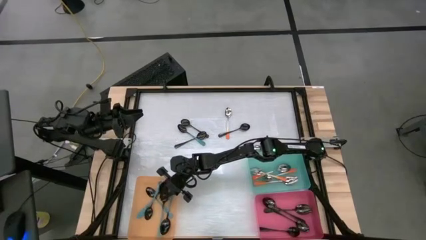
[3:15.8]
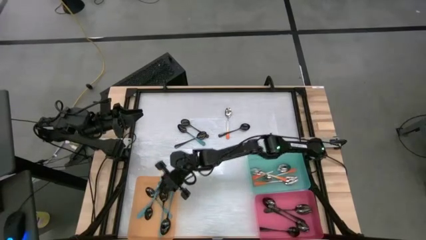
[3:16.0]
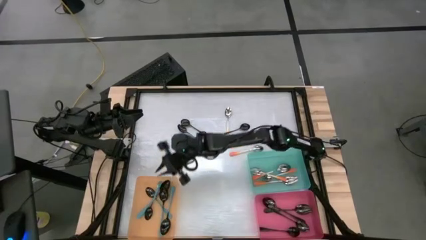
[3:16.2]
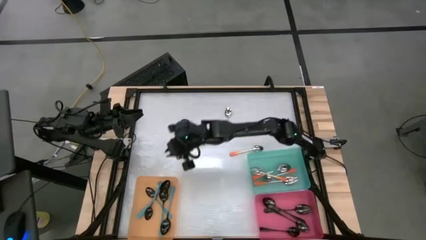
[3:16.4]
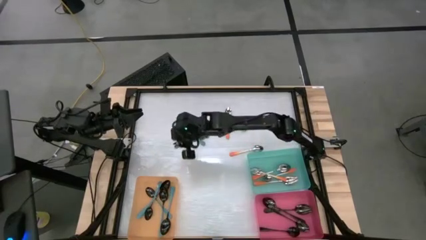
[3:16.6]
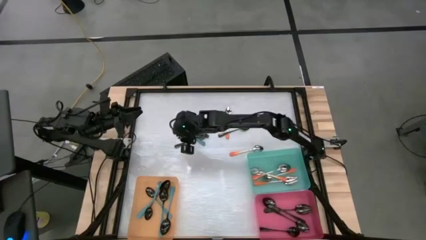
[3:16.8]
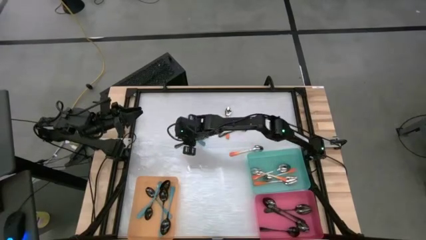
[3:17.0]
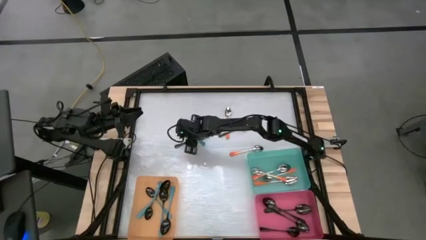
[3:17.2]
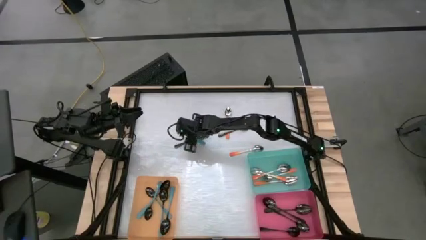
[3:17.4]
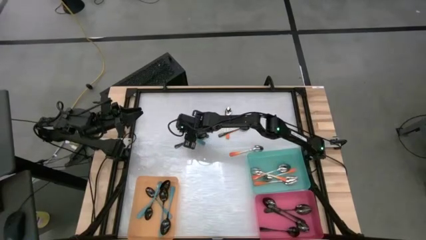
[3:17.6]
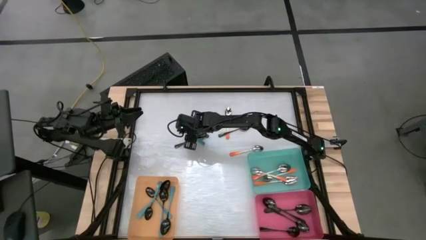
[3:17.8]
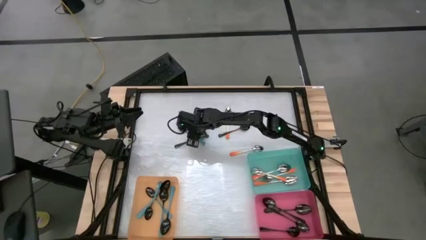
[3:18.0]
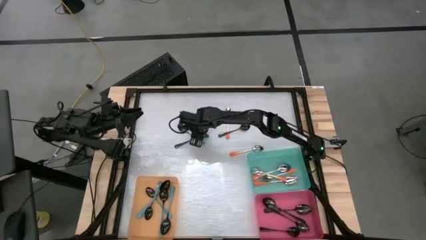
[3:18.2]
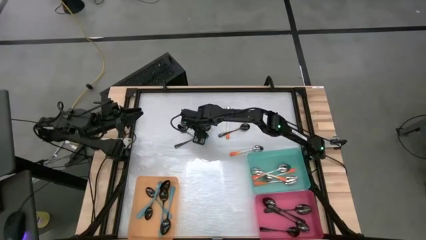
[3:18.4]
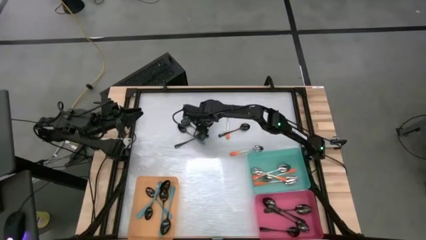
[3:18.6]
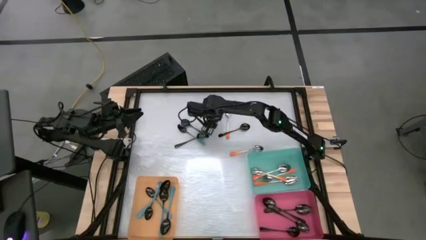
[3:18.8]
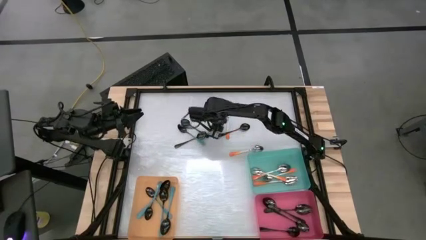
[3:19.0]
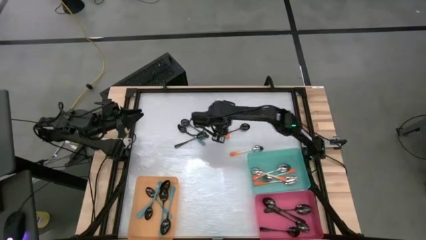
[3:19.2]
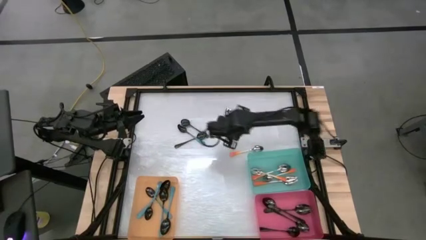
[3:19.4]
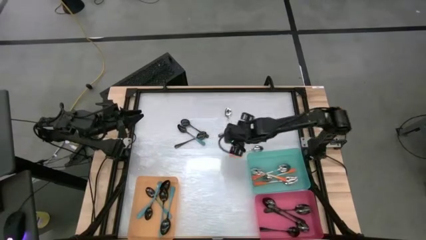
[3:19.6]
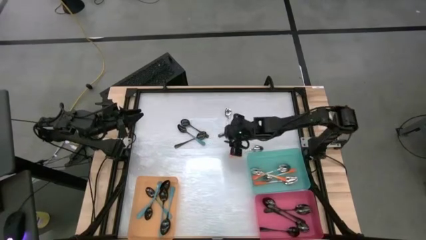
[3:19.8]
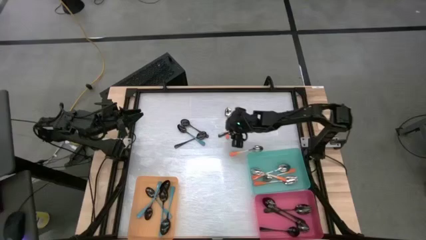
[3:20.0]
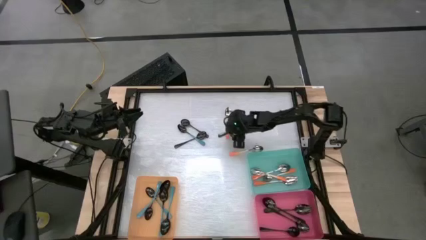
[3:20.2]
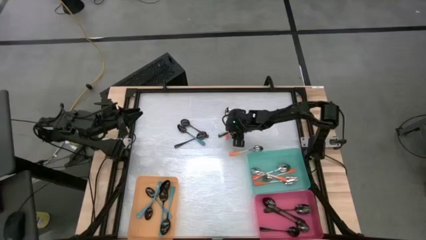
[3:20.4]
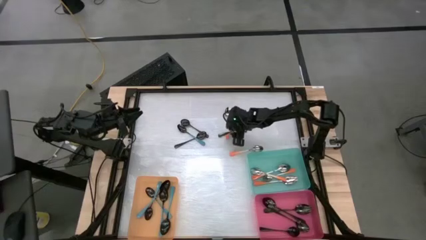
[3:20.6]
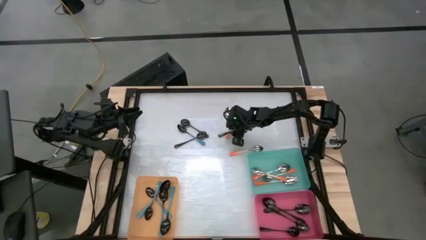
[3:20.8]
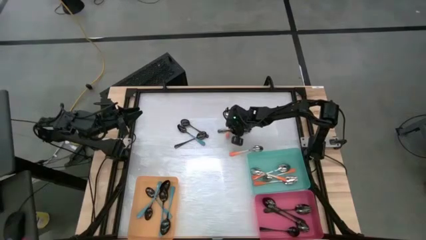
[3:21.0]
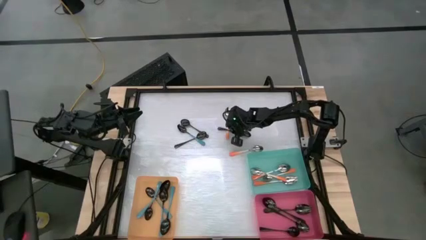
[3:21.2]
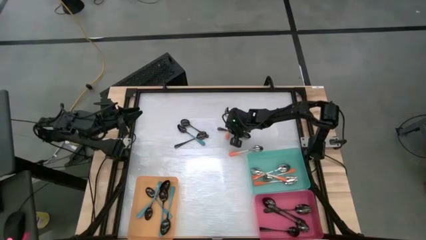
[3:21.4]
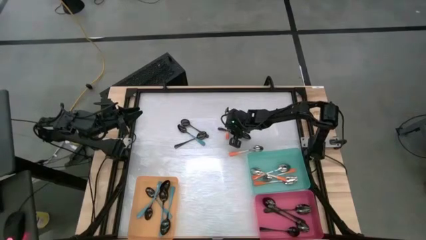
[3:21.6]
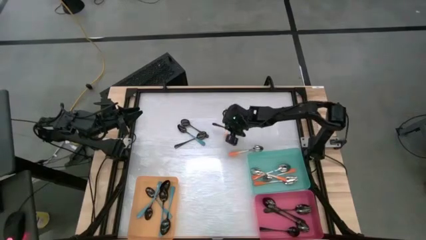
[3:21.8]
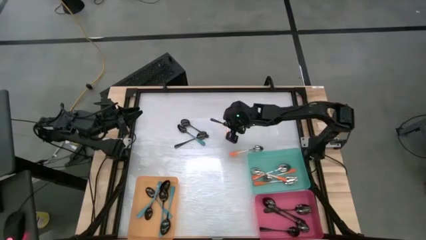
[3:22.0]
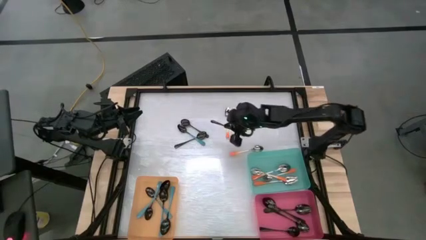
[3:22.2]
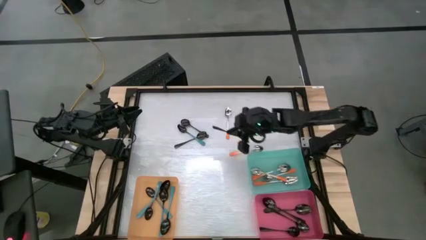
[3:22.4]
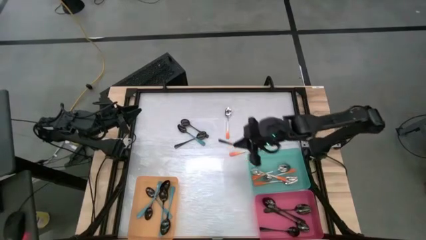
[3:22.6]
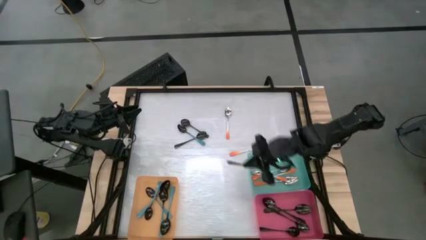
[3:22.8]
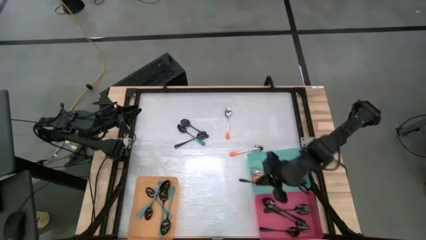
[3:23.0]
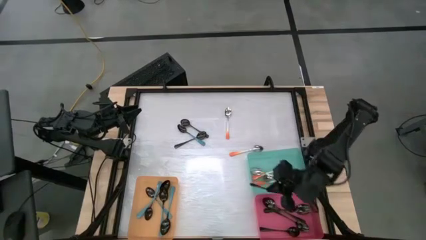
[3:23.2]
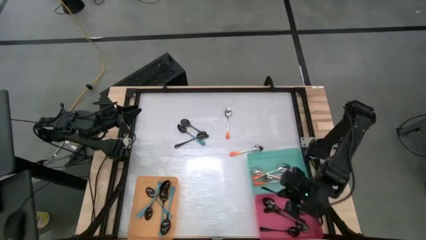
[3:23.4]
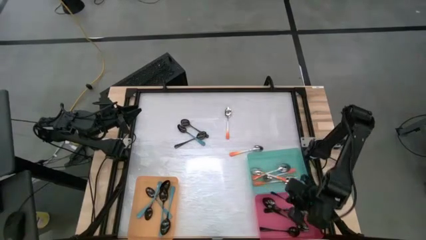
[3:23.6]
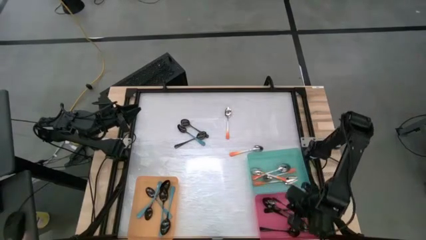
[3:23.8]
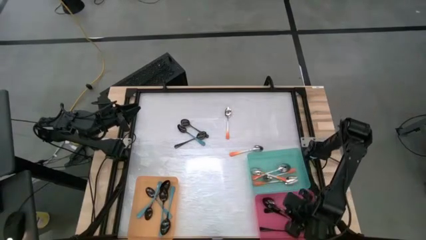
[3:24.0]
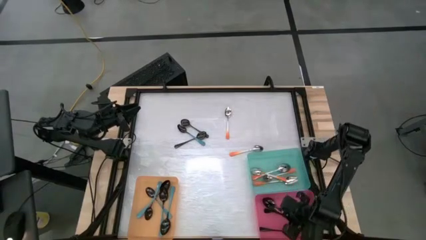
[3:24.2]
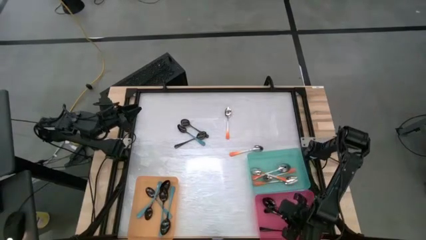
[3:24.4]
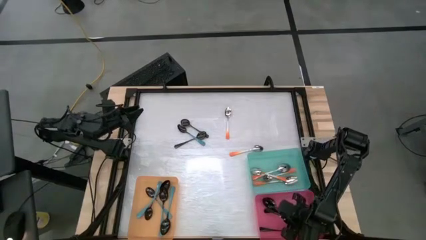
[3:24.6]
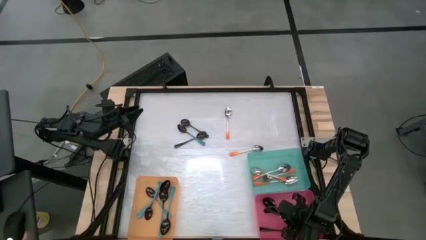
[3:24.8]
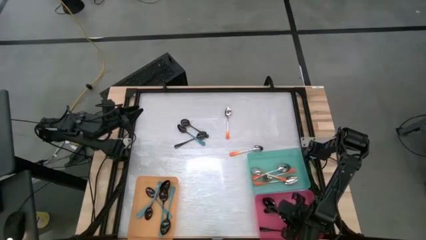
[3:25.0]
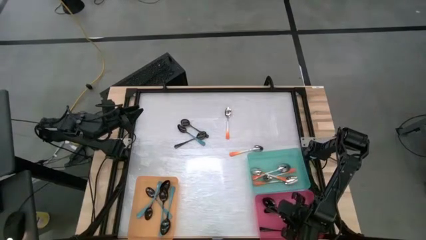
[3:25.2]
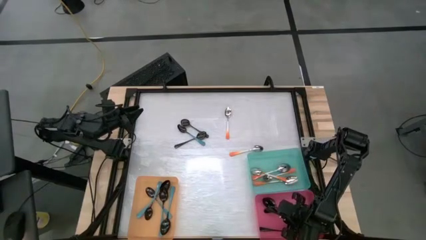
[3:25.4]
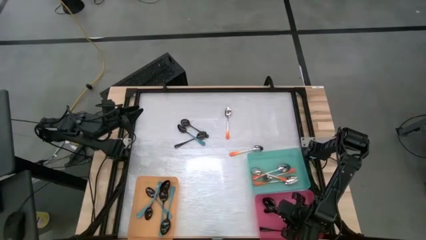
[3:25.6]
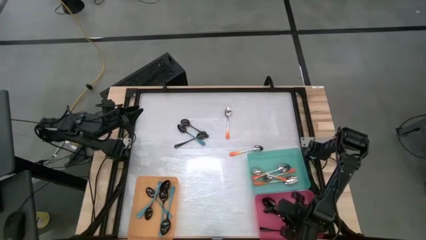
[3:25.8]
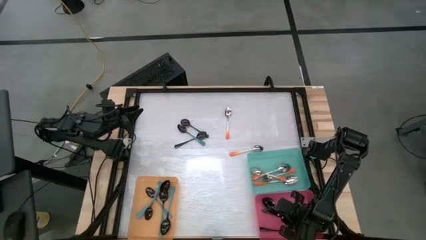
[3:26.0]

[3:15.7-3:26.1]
Task: Sort silverware by color (type)
Put the black spoon into the pink bin

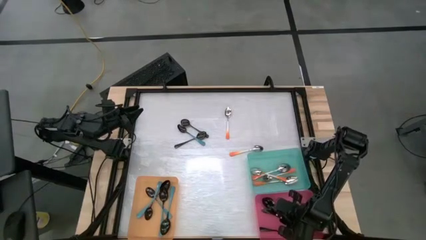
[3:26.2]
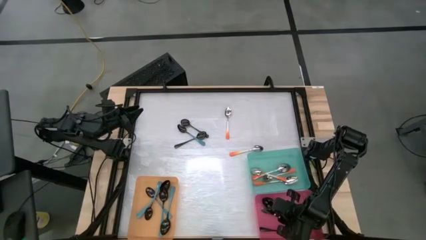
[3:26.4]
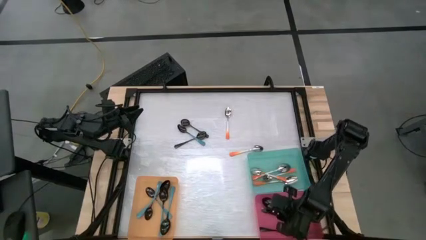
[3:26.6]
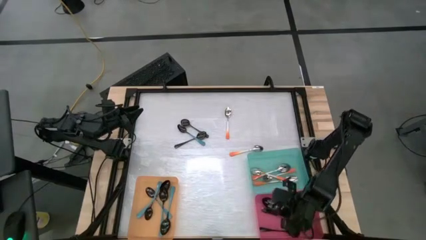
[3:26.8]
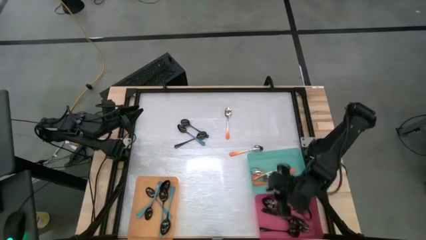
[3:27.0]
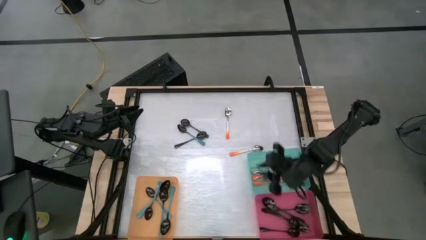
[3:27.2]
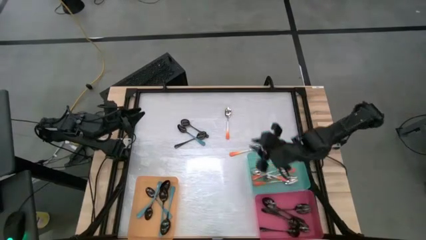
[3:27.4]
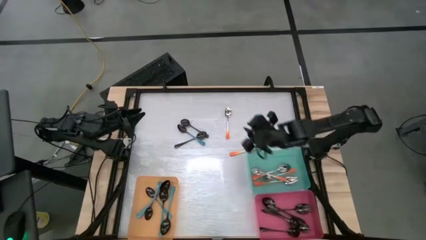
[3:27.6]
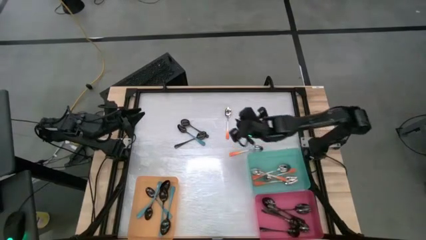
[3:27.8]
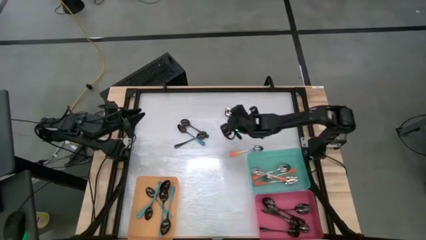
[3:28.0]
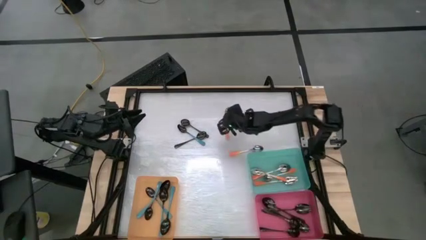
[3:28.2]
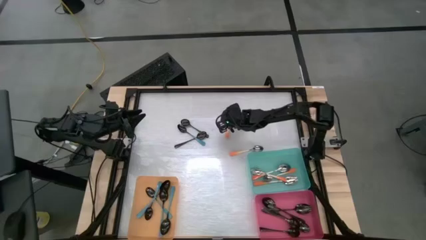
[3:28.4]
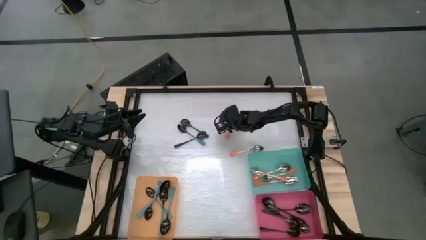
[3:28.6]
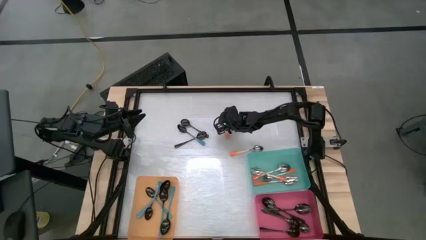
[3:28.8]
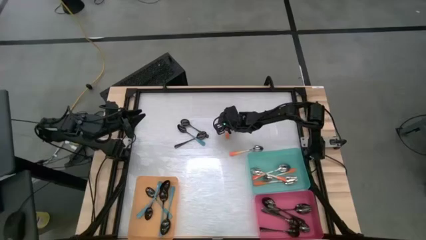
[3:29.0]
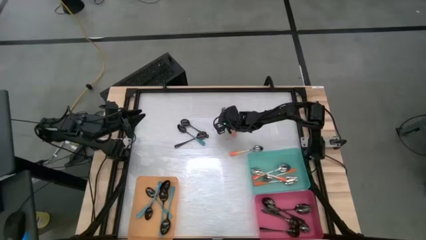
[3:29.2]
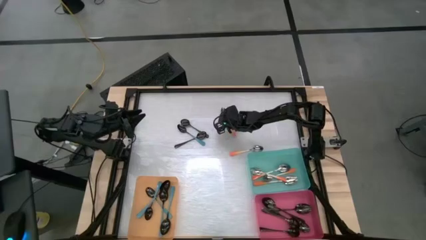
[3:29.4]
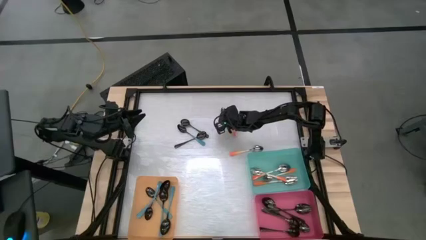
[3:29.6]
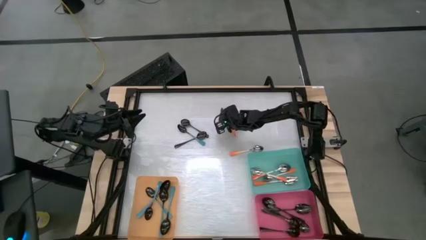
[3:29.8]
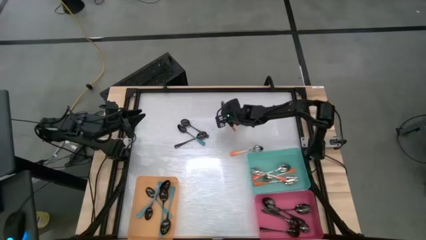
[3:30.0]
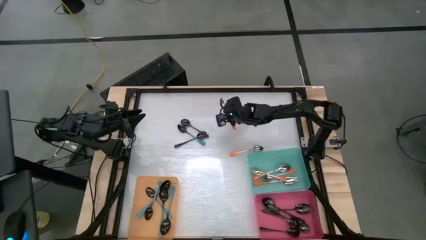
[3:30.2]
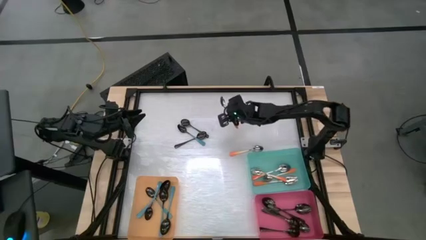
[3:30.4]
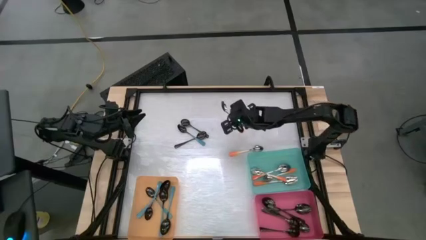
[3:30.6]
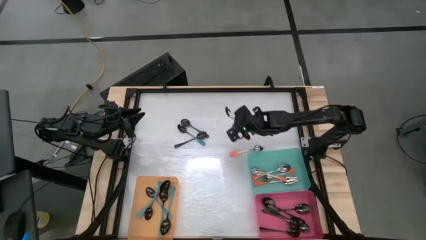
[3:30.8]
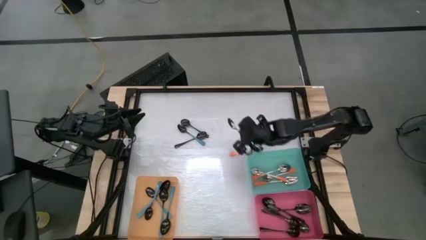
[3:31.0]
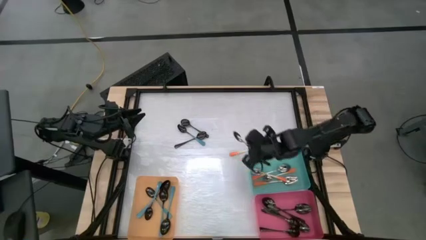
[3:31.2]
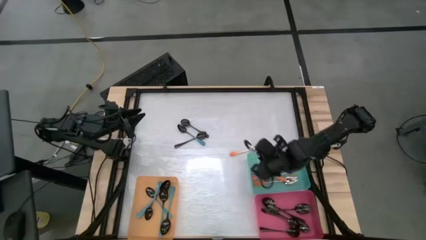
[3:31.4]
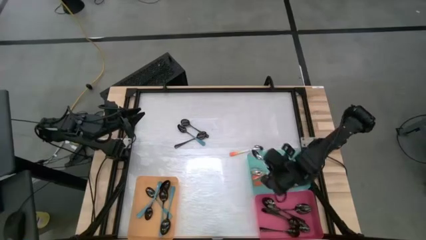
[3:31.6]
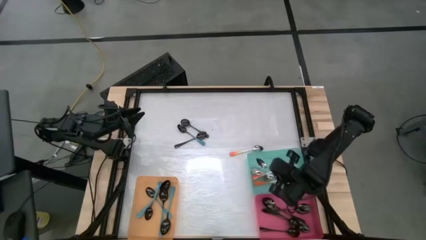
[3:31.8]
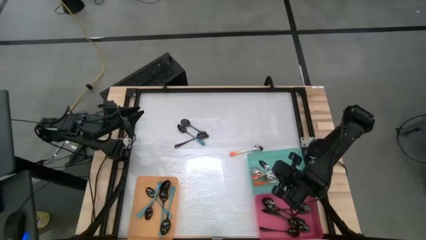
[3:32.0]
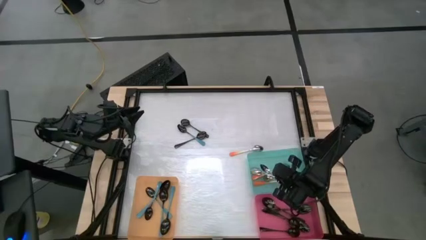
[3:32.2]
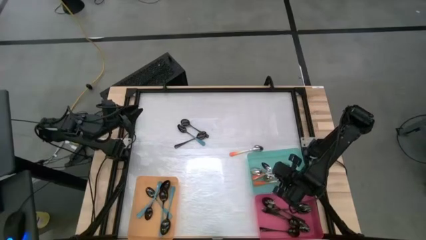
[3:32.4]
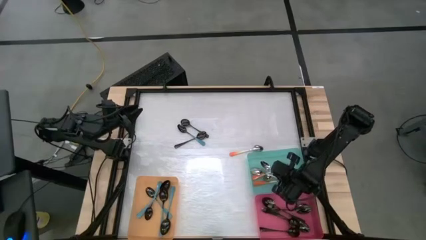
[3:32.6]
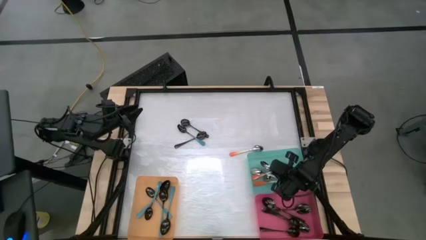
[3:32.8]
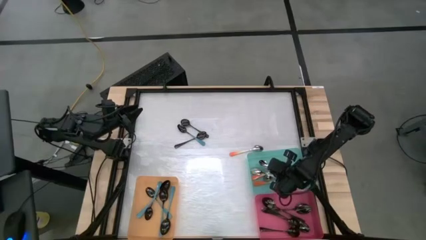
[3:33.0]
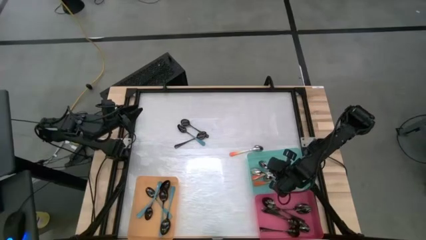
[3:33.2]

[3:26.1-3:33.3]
Put the orange spoon into the blue bin
